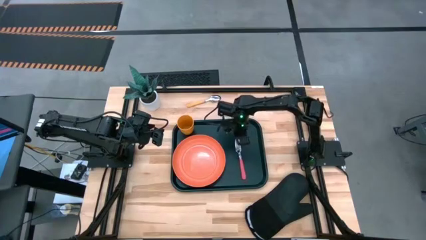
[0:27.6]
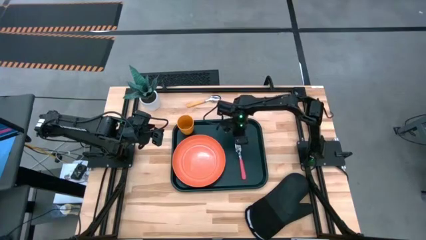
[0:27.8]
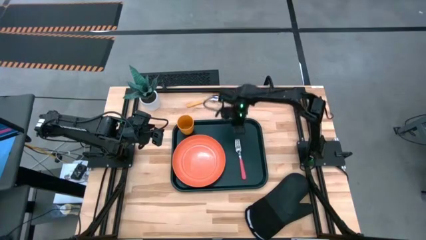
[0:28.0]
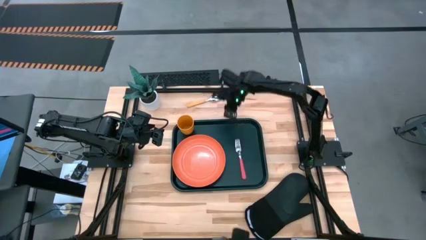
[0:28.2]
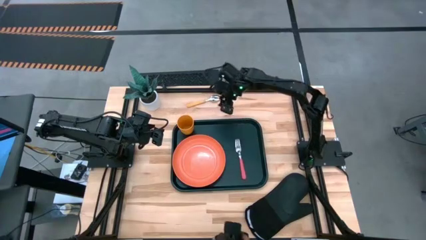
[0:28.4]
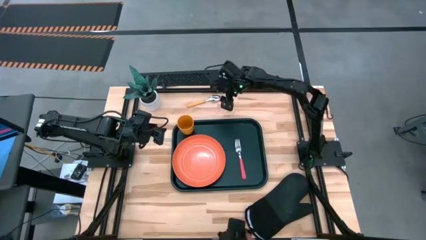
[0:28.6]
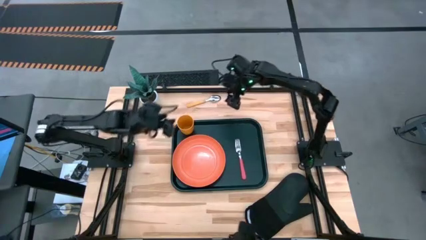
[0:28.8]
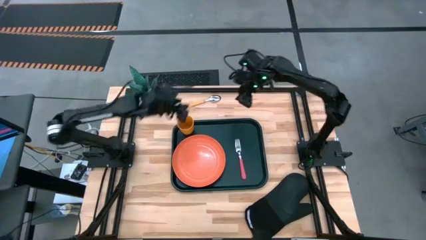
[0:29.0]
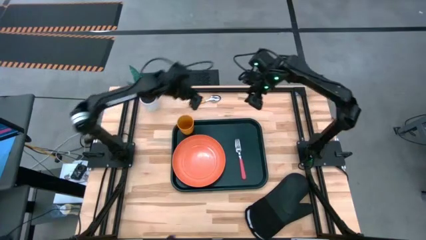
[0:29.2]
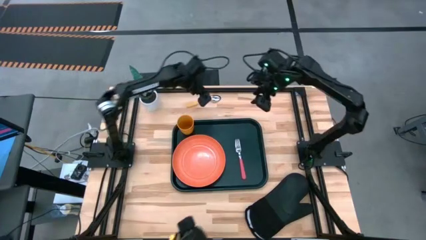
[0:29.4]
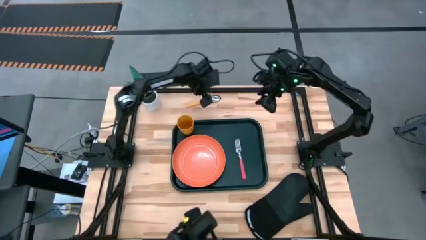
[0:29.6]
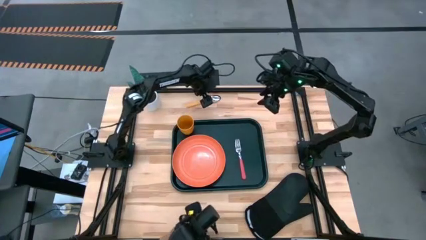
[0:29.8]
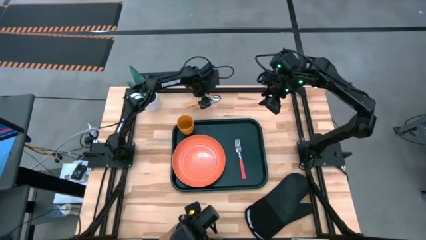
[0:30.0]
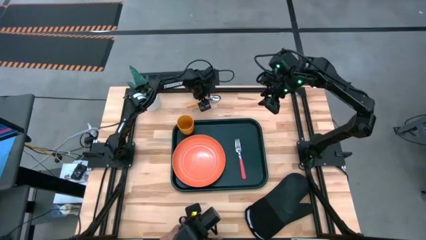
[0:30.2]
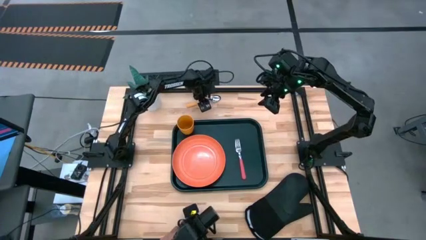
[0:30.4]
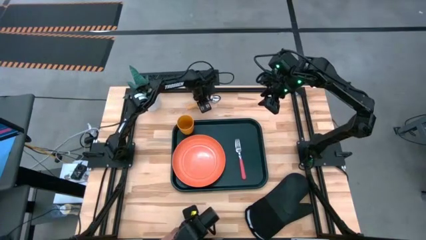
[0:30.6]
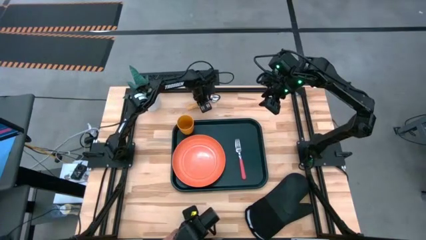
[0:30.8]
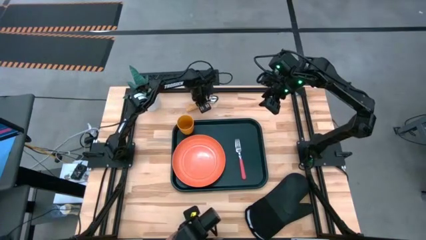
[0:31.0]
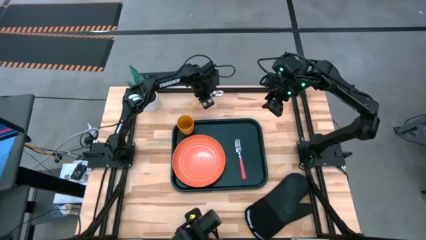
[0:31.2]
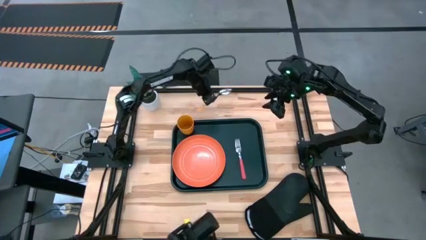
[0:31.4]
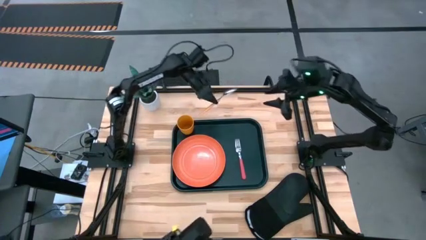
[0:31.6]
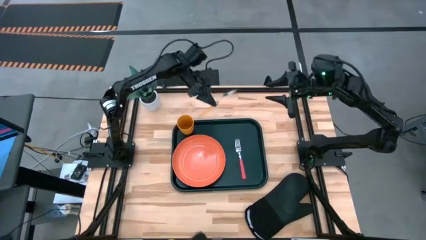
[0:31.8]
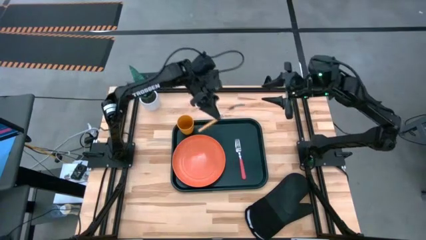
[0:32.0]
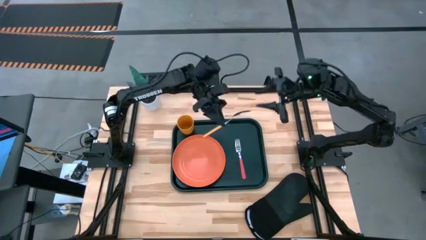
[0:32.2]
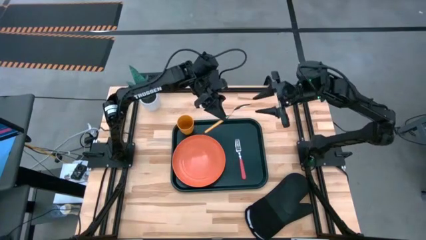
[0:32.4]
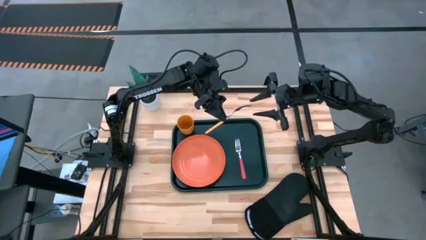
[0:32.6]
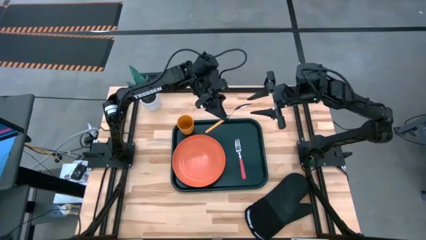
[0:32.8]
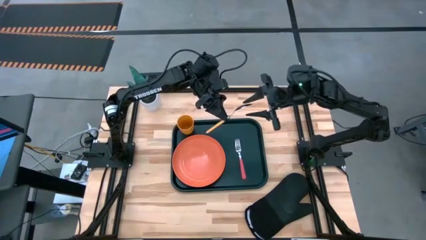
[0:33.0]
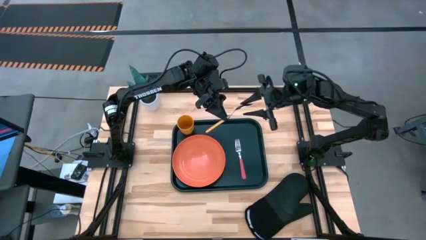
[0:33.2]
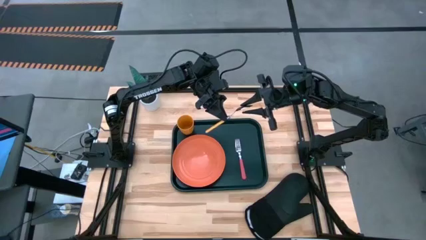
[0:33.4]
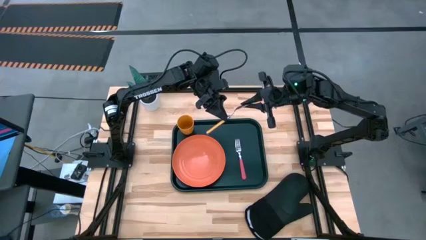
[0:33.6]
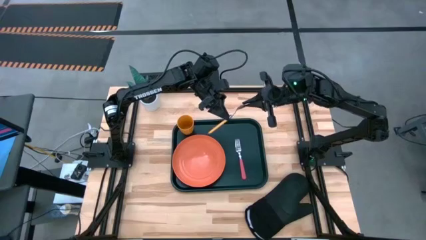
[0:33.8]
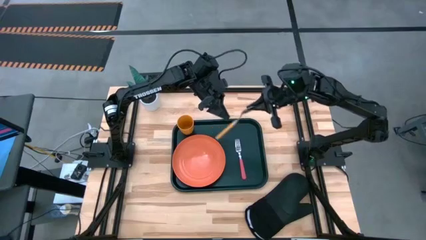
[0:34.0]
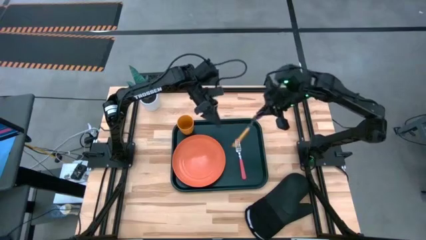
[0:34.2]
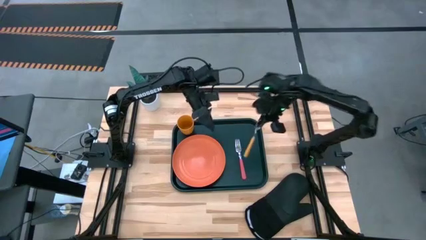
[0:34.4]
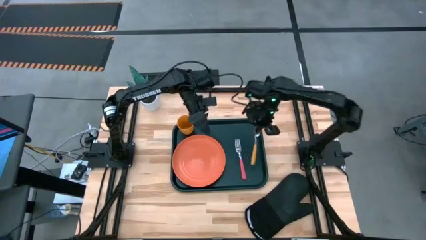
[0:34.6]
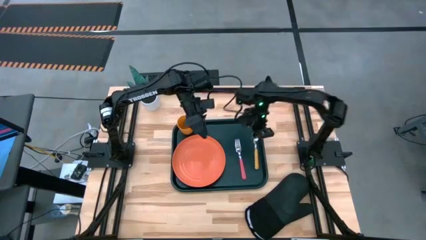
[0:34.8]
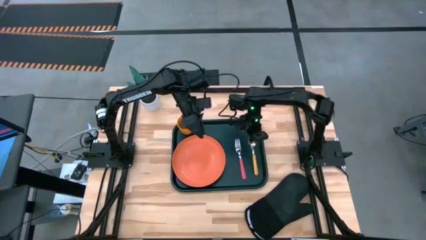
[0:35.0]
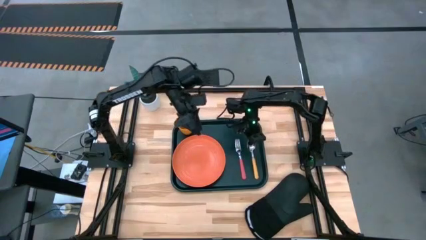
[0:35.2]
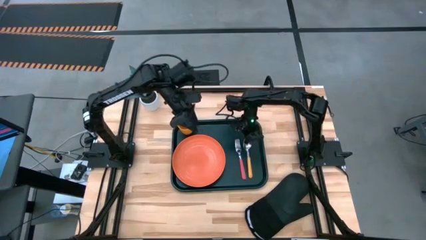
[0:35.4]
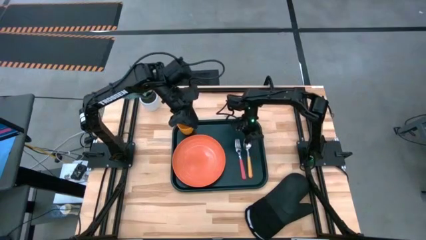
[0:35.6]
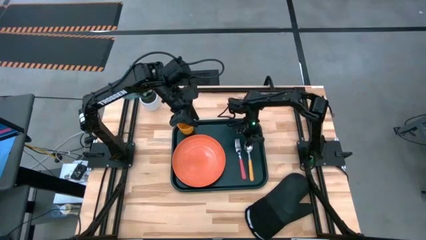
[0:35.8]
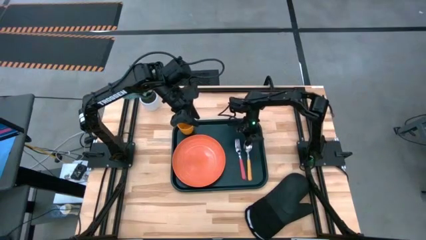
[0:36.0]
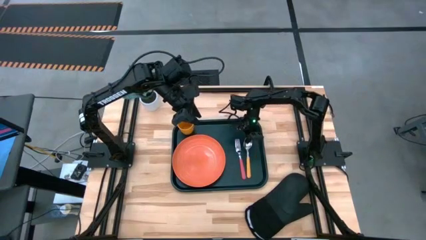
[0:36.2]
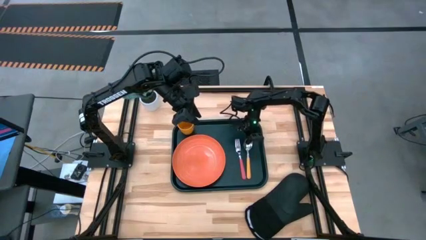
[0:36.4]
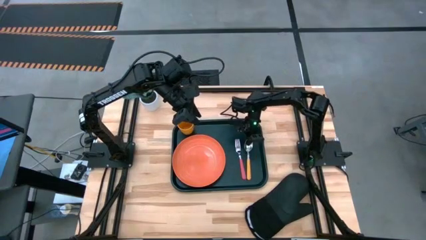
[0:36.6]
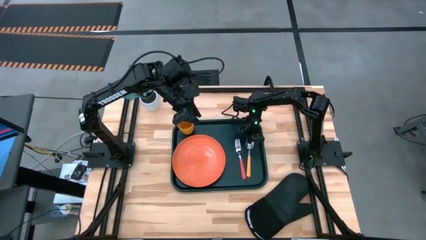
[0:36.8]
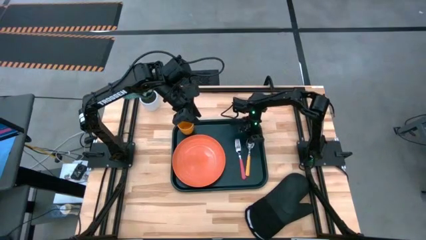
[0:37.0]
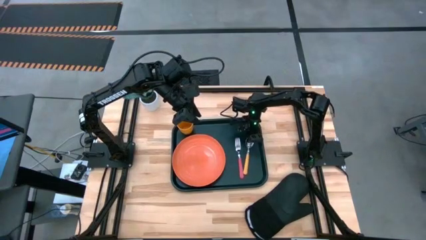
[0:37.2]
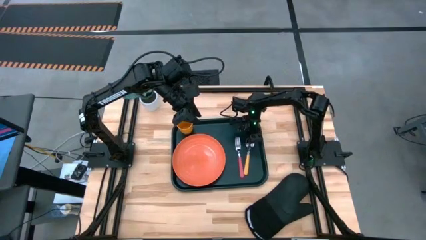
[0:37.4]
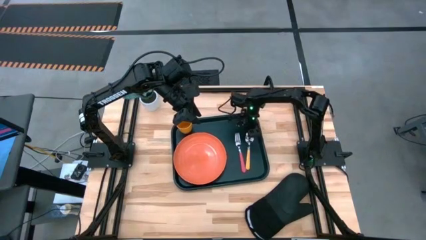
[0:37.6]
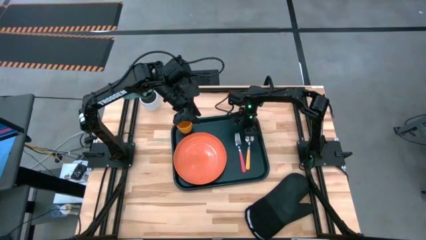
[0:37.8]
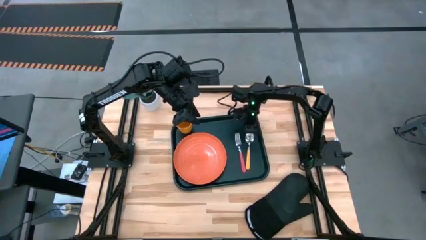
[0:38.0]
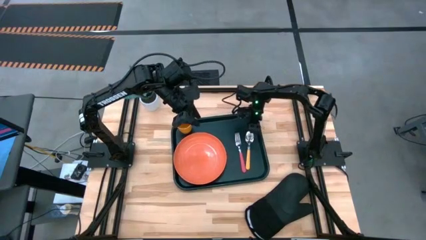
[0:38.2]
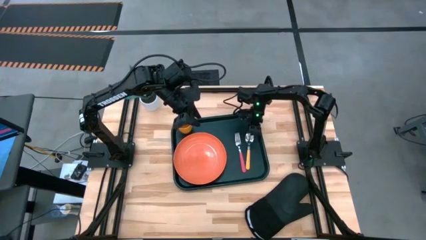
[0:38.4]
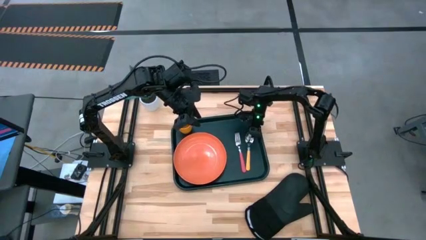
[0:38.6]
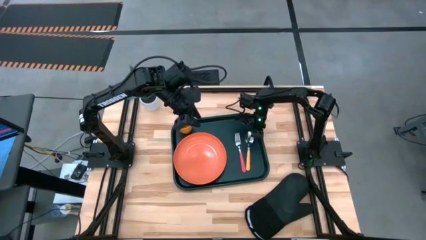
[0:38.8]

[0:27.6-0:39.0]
Task: Pick and place plate/cup/fork/spoon on tray
Put the yellow spoon on the black tray to the right of the pink fork

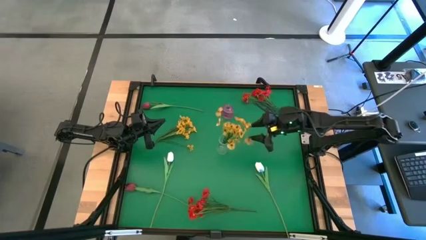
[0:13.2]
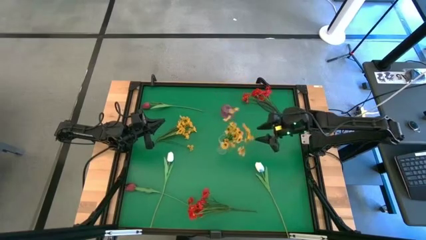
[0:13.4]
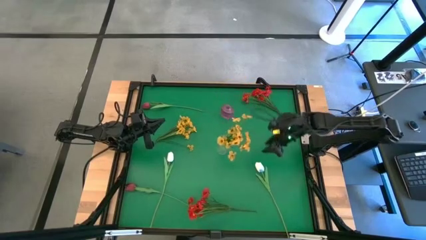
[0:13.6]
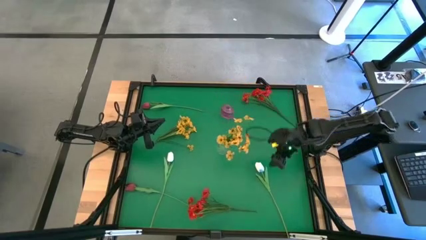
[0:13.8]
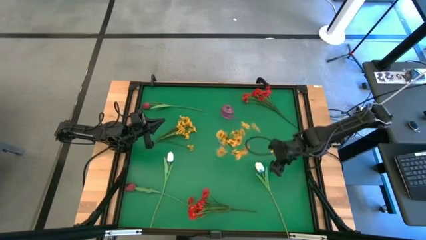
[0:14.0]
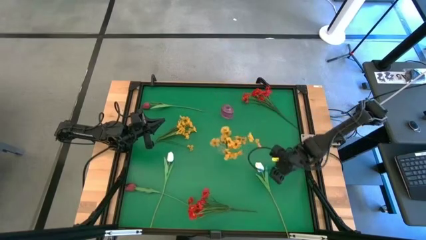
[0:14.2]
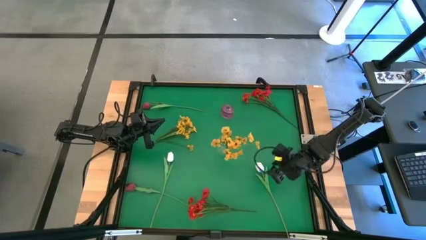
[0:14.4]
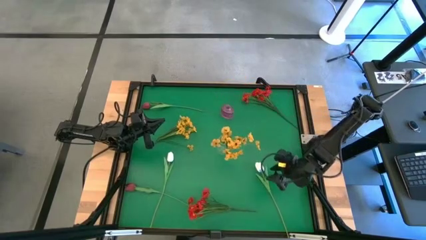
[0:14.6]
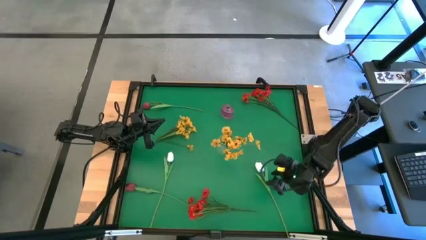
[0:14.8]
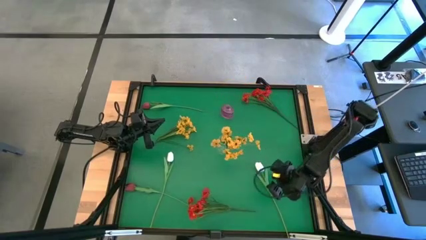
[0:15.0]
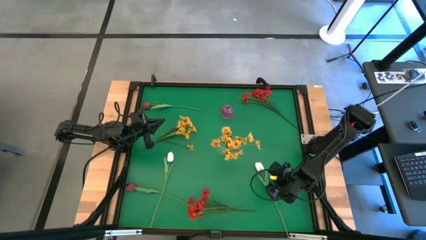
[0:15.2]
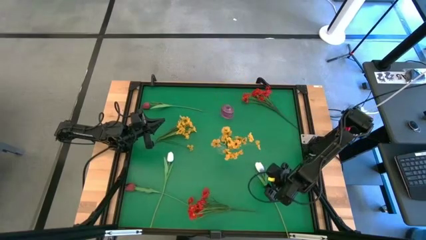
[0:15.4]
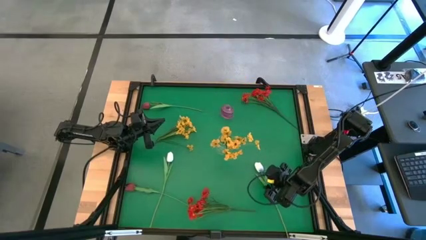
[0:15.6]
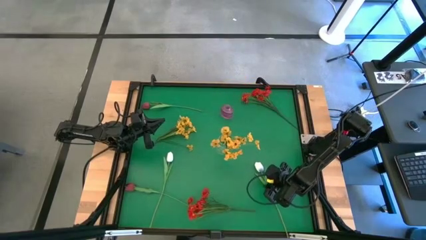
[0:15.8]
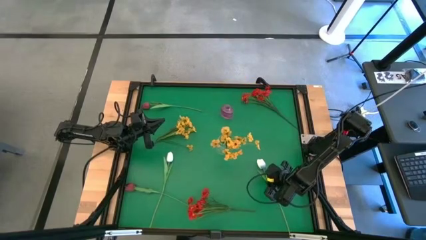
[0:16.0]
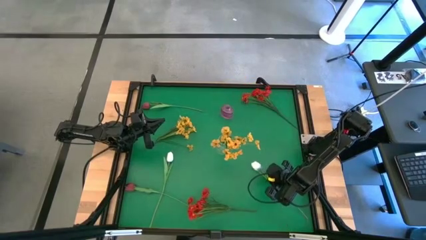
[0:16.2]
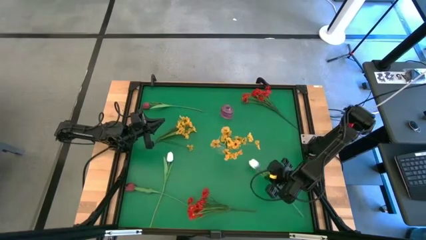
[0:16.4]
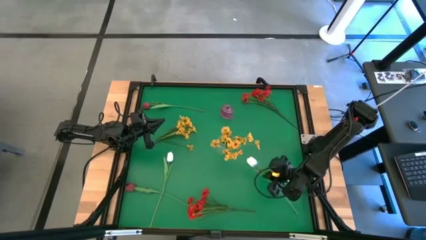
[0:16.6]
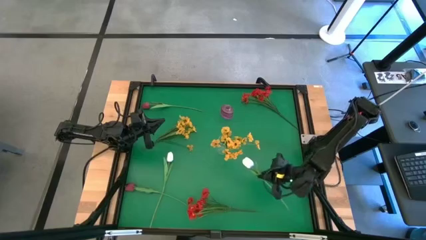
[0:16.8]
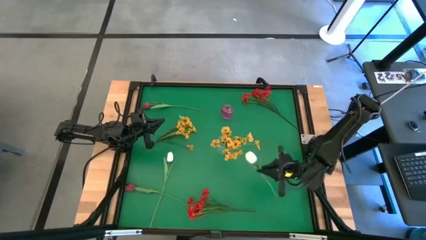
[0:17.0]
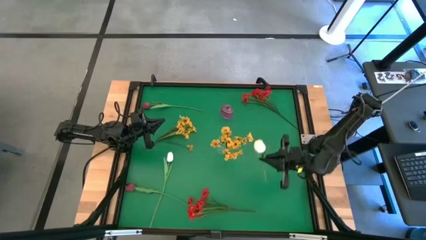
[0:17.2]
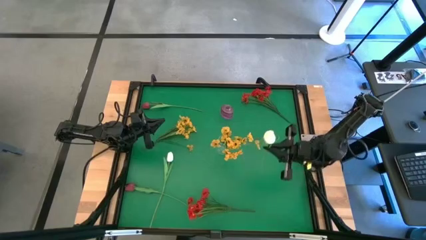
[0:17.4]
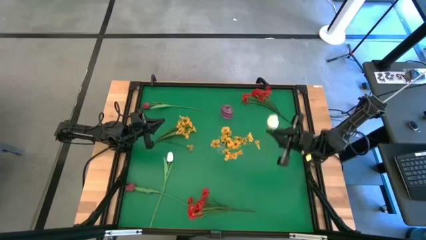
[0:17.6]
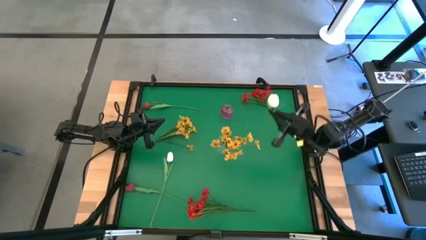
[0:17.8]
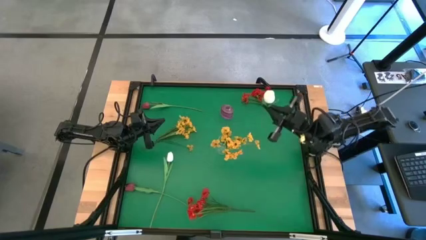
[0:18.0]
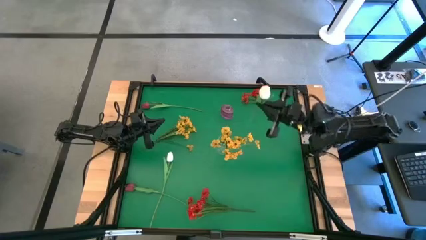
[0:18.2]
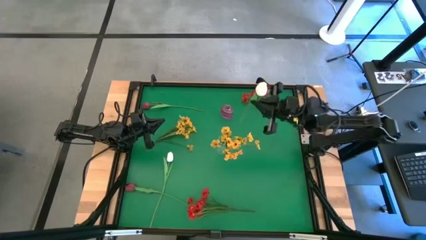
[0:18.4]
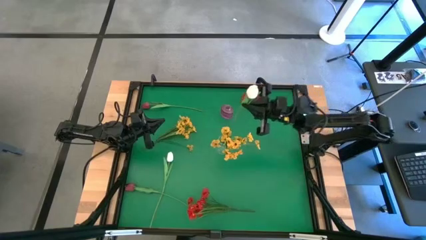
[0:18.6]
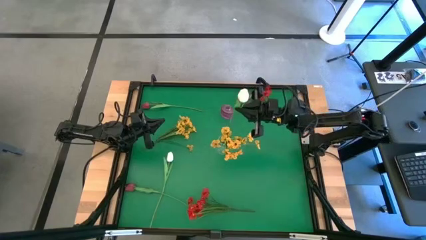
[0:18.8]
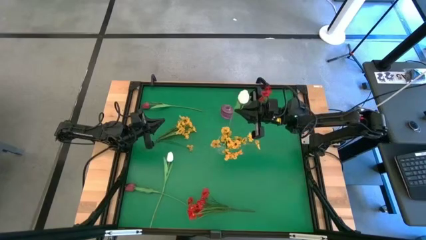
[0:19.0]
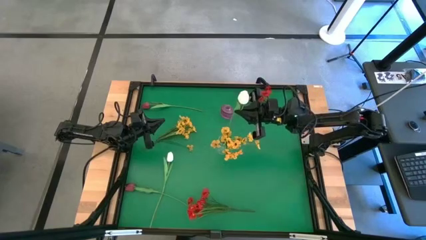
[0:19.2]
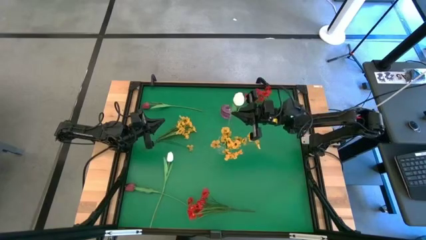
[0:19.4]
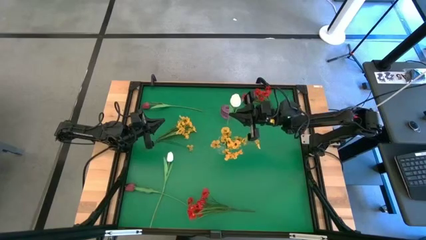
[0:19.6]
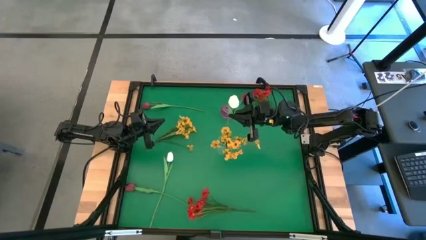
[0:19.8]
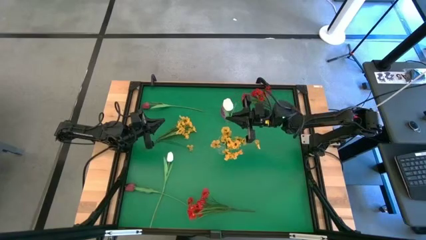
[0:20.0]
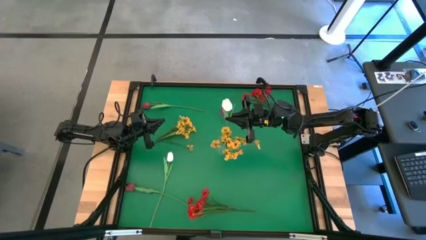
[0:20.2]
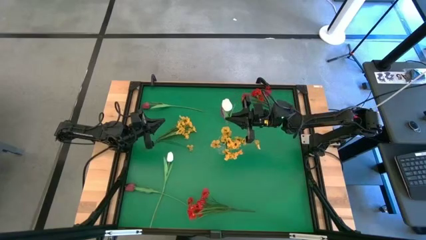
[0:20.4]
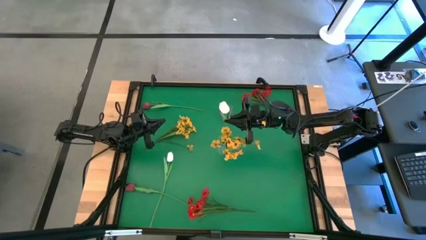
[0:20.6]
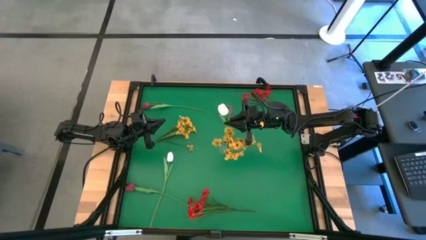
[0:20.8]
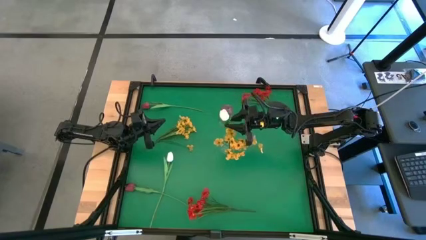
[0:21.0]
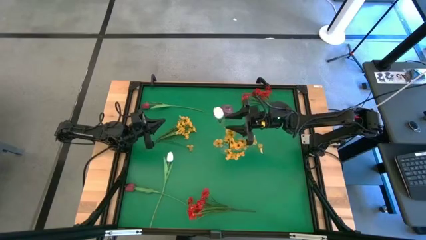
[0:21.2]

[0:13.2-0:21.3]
Task: Sort flowers into vase by color
Put the right white tulip into the transparent vase
